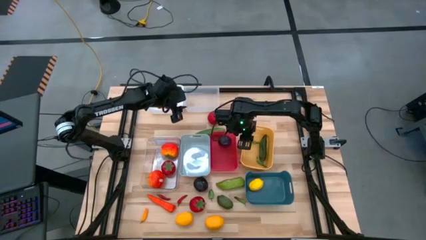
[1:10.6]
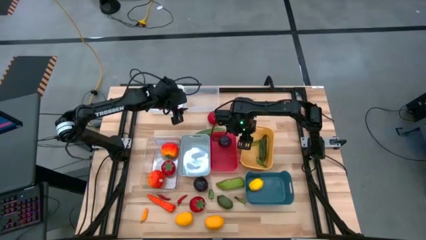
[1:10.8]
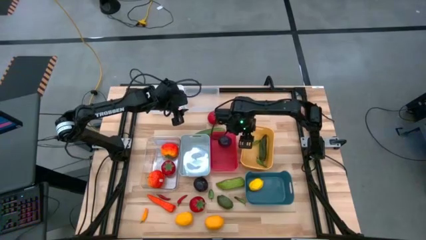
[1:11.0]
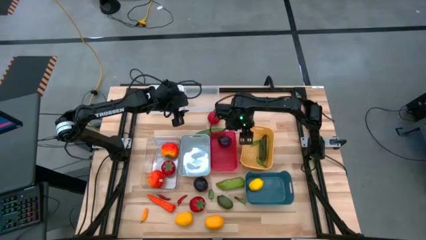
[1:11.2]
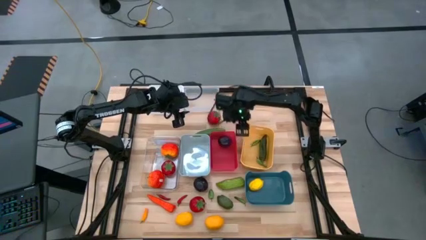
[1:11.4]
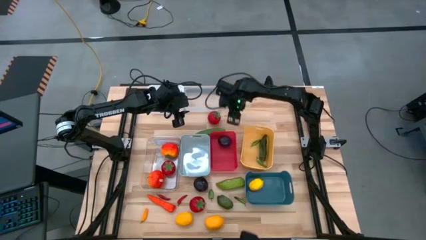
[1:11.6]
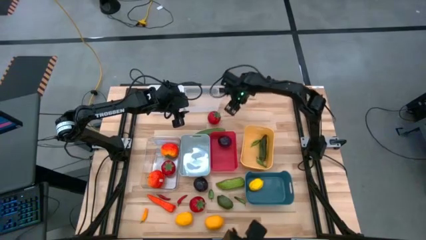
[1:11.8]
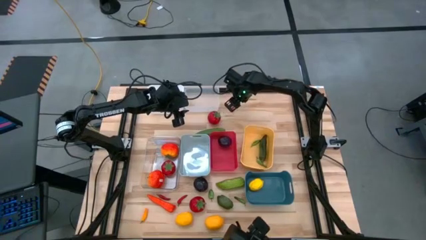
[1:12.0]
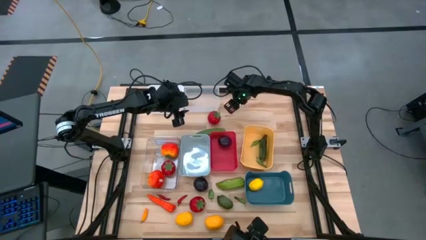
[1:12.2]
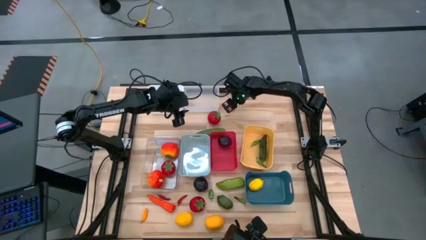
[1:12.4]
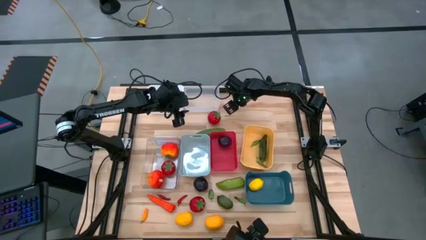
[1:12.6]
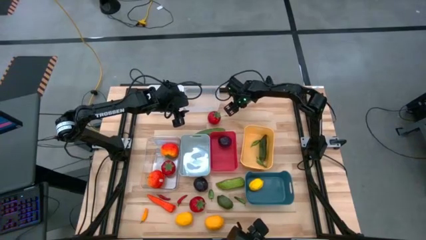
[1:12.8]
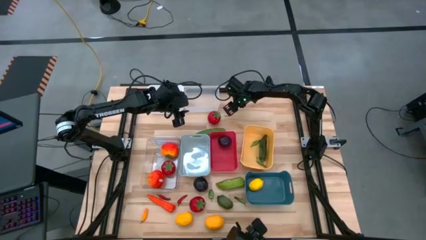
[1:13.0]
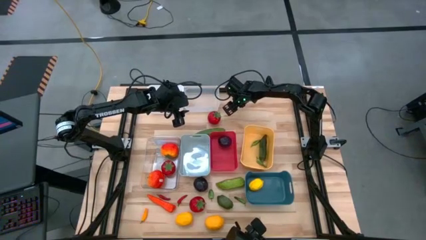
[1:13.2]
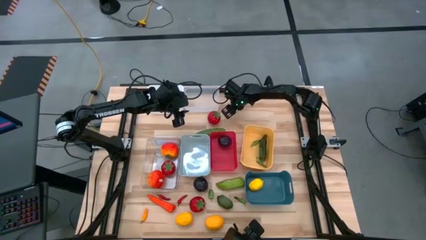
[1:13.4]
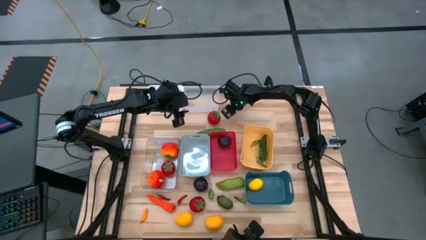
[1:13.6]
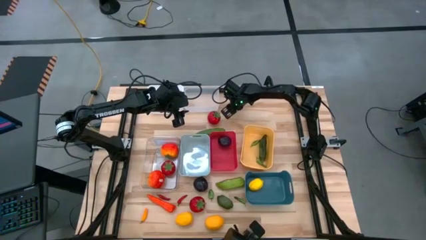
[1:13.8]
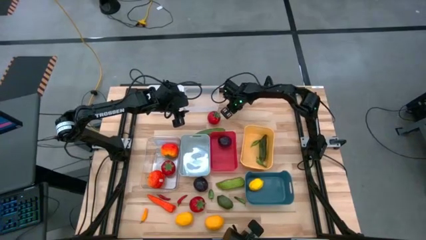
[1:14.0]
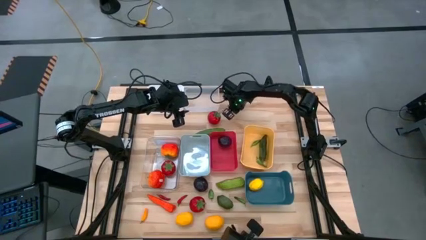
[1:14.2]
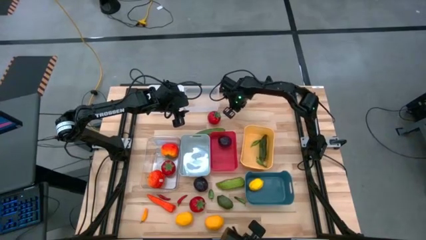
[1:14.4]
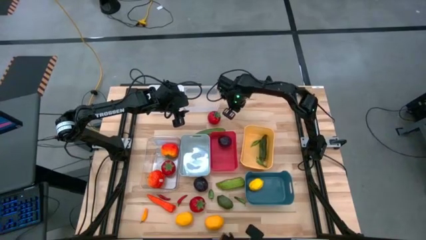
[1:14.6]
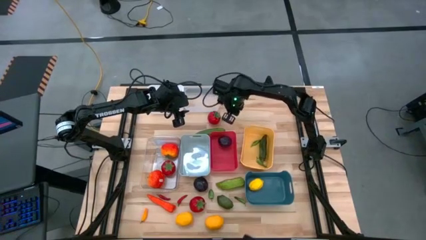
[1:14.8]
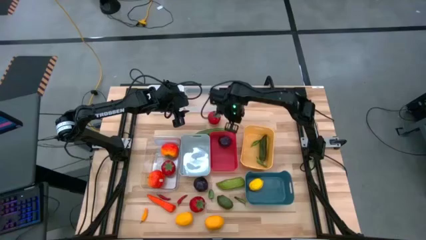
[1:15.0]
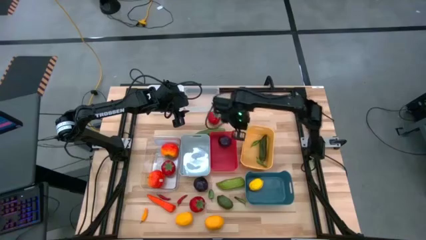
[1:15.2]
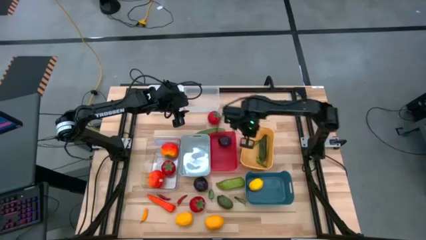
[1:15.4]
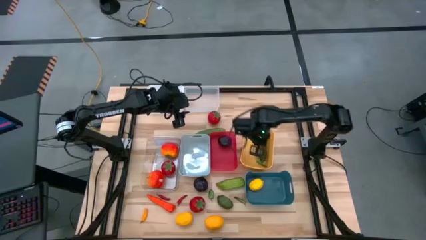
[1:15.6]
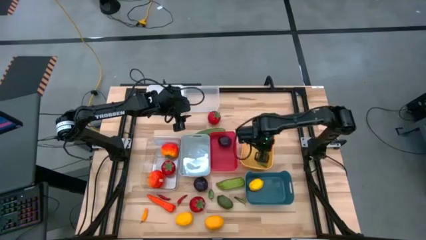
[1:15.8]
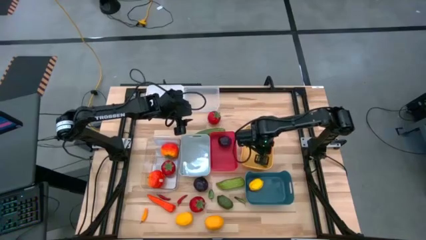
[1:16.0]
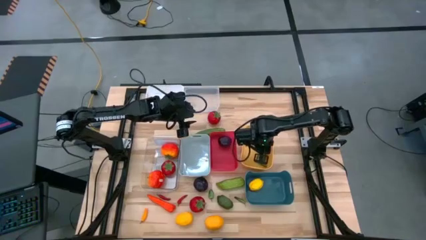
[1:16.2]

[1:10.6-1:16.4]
Task: Sort produce into baskets
Put the orange chili pepper into the yellow bin

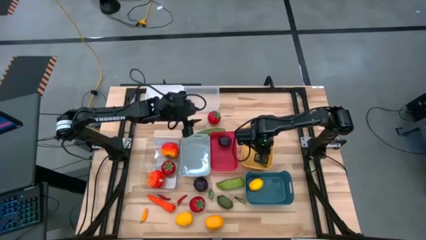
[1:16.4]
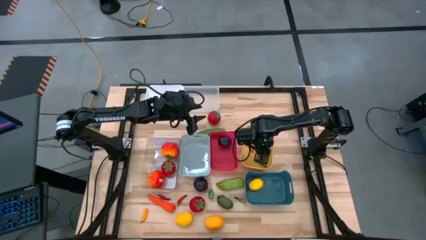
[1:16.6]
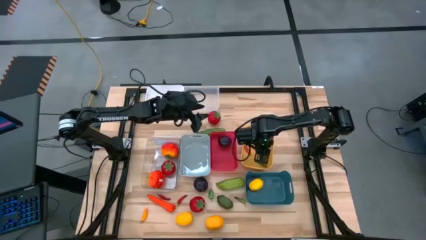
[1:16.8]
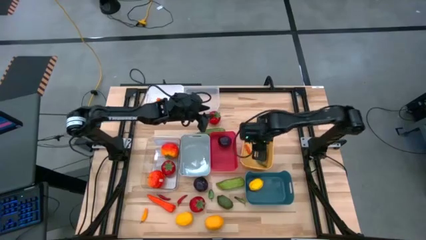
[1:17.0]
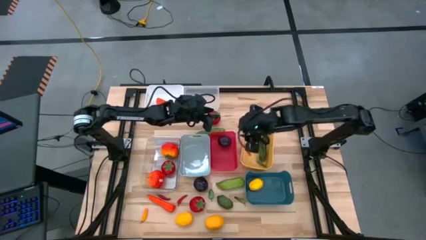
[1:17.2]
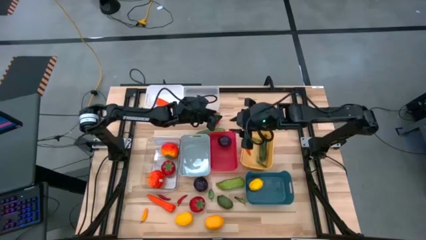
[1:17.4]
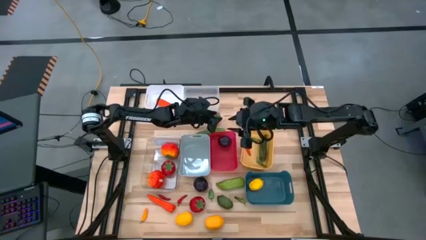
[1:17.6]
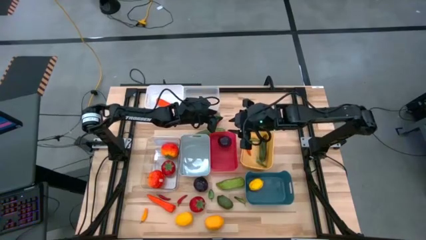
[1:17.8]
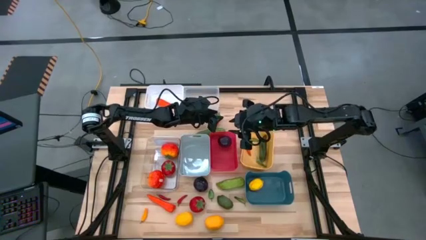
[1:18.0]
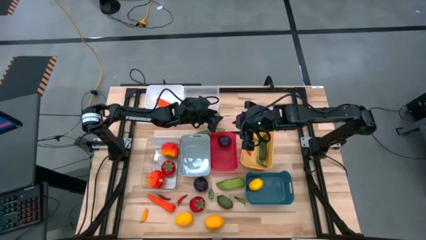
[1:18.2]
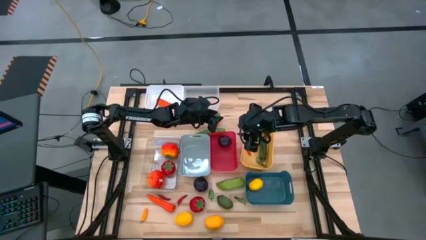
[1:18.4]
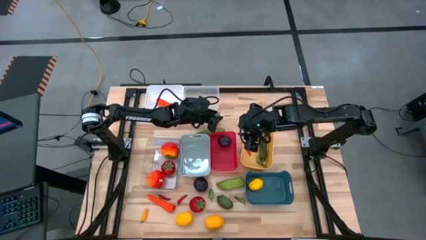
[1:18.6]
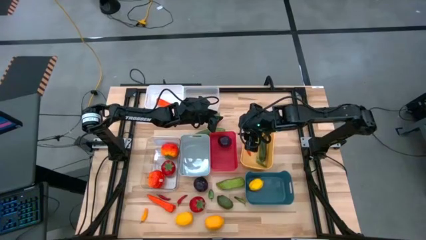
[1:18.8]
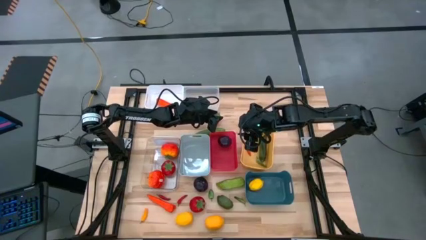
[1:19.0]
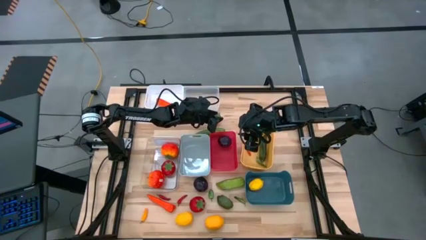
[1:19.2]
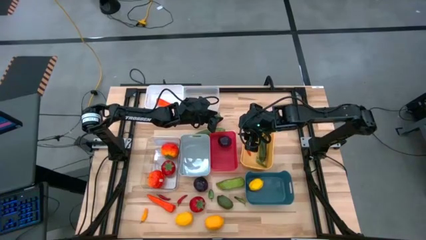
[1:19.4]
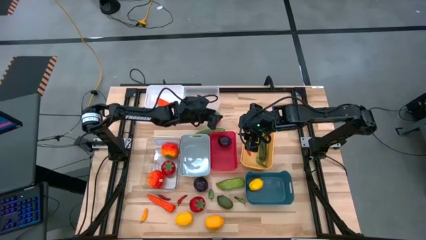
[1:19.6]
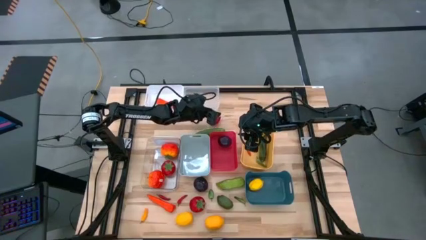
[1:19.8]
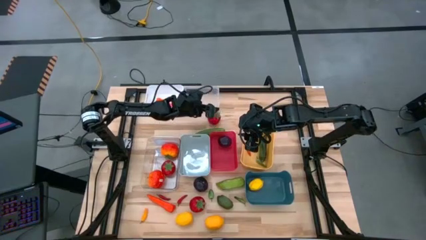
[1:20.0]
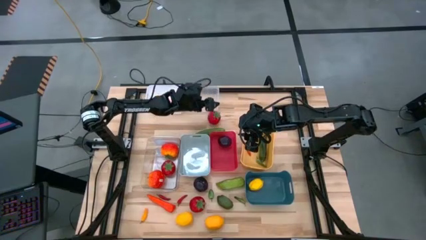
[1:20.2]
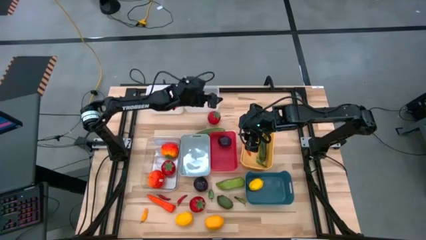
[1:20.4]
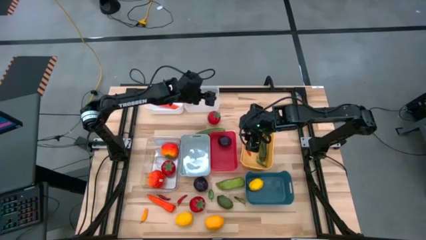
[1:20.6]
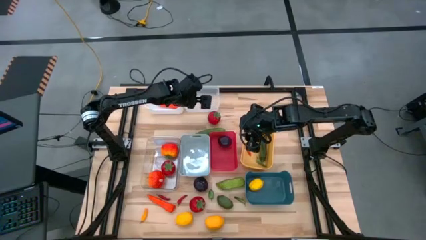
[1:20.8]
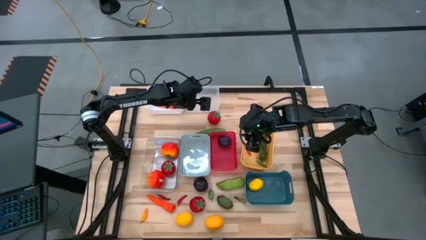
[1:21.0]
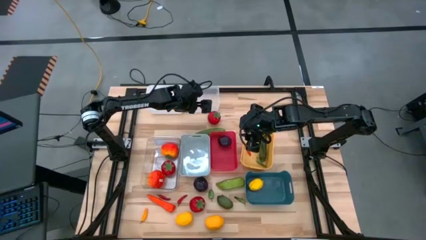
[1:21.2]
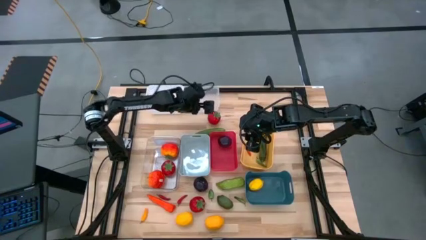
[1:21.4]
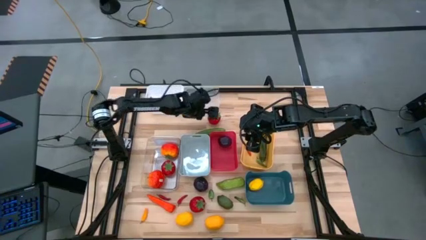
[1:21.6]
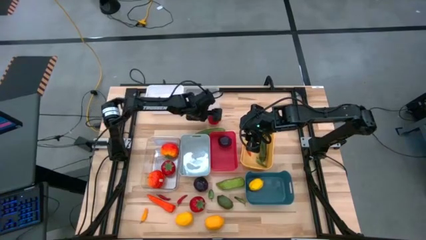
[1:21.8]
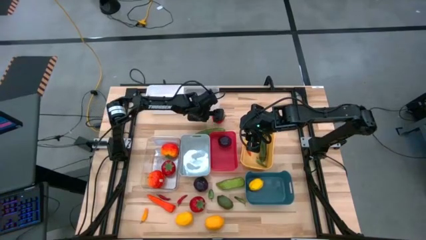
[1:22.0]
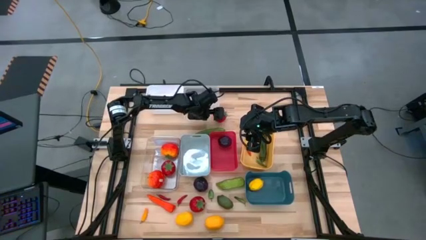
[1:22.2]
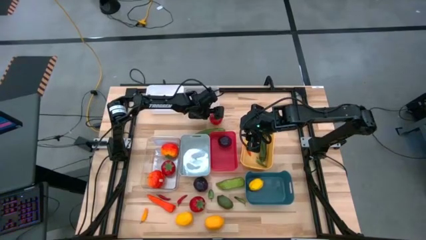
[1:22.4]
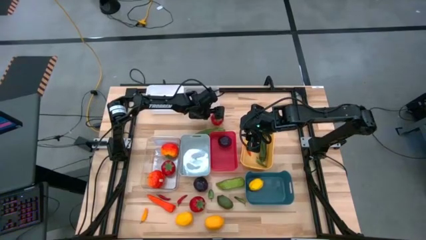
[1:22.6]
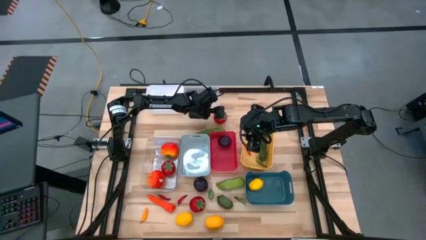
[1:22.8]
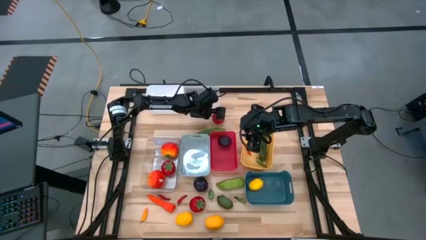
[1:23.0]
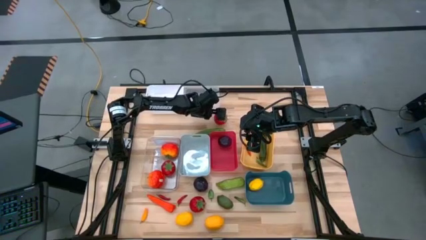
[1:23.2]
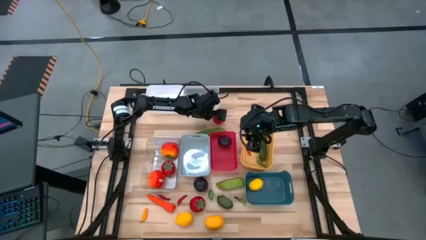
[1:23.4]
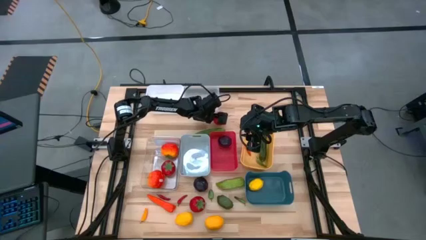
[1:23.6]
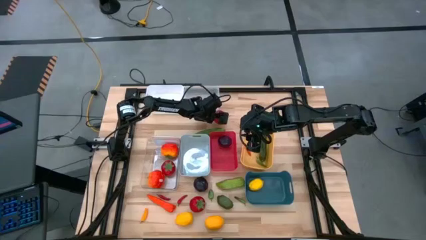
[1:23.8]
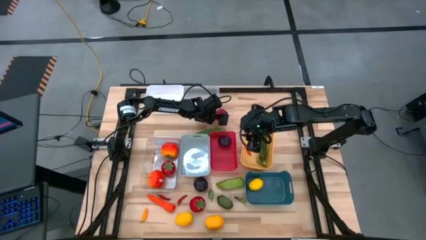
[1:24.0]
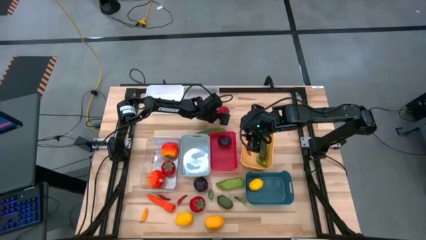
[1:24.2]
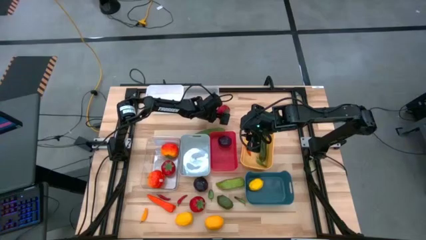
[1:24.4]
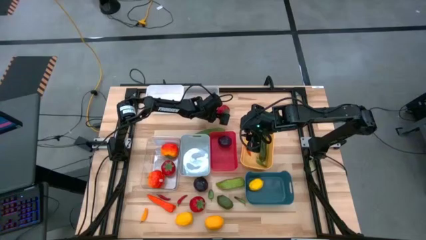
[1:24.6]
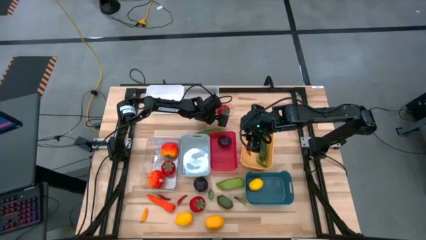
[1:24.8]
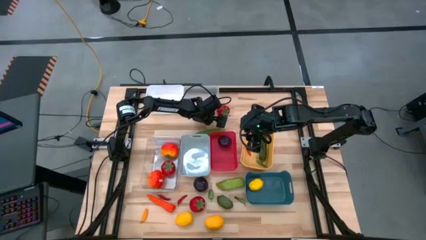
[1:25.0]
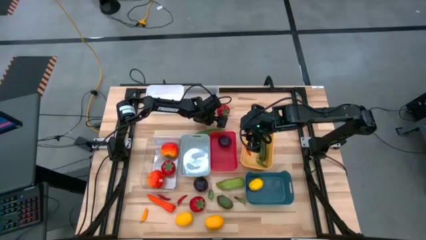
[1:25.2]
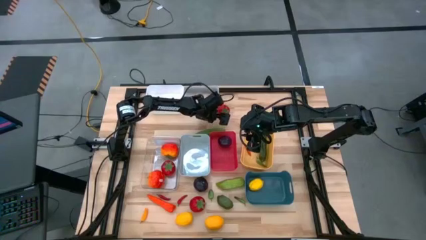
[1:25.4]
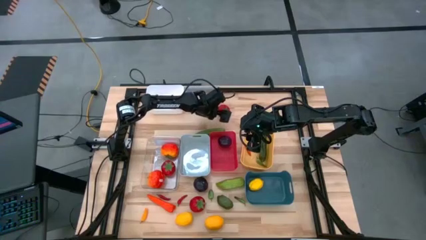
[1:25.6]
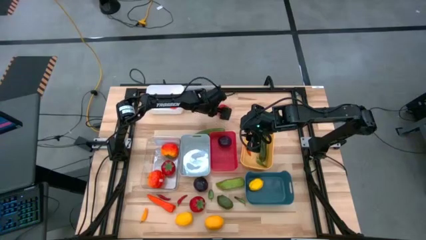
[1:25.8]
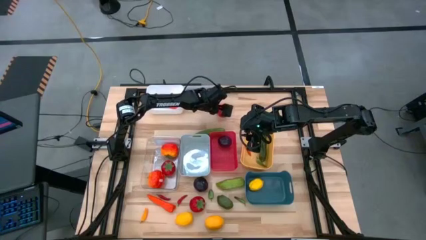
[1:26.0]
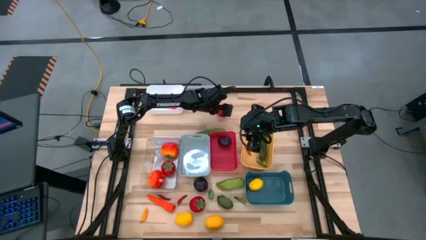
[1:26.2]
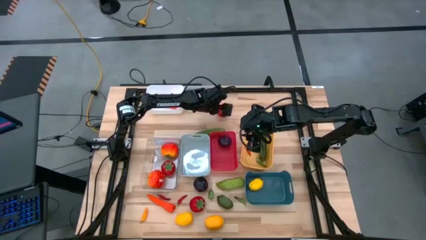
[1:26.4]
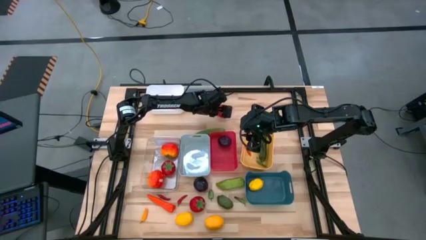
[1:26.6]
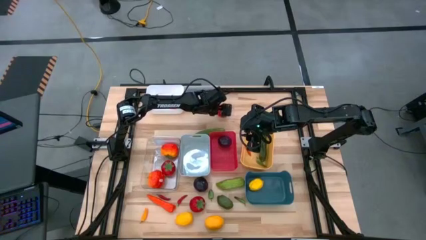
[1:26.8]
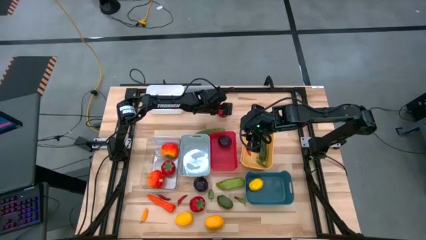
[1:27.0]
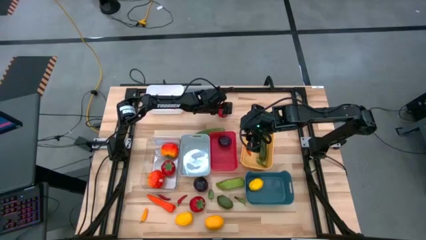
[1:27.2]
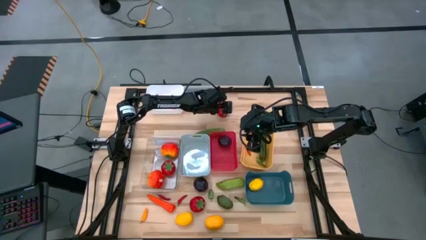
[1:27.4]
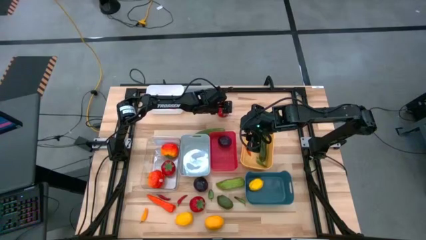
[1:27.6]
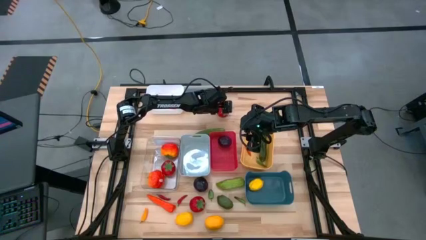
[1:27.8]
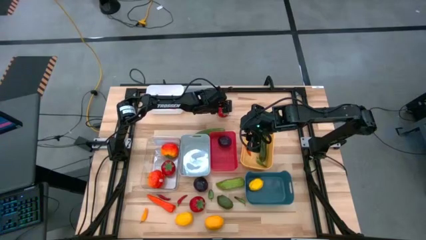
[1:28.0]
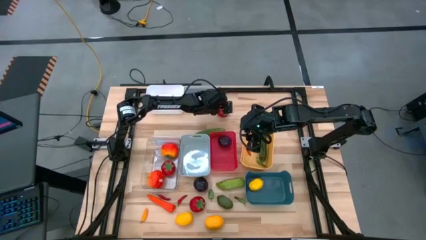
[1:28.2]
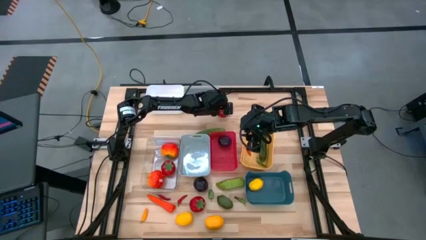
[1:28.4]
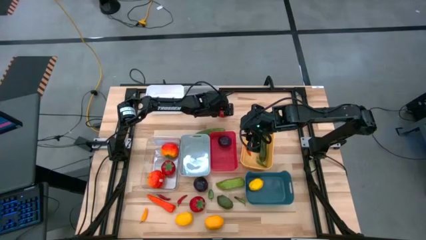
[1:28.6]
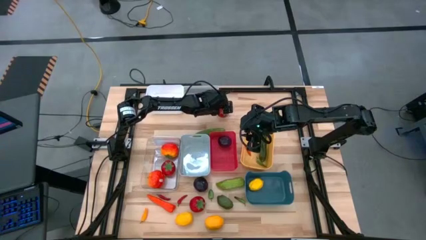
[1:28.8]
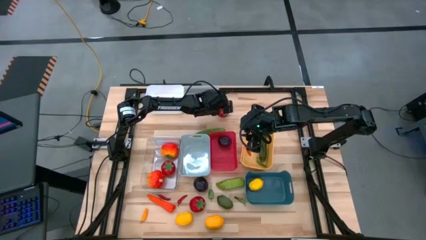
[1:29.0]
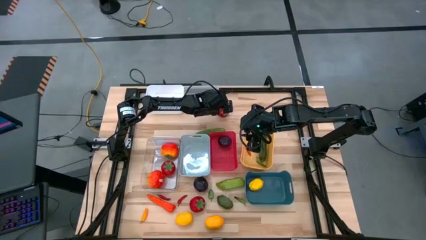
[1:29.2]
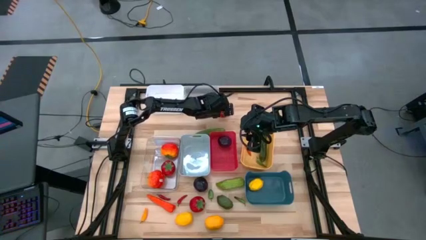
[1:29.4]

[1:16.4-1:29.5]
Put the red tomato into the bottom transparent bin
